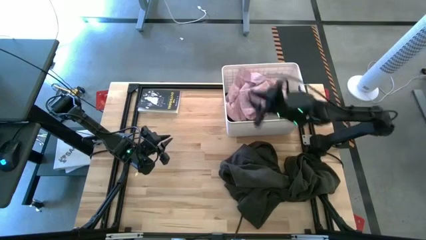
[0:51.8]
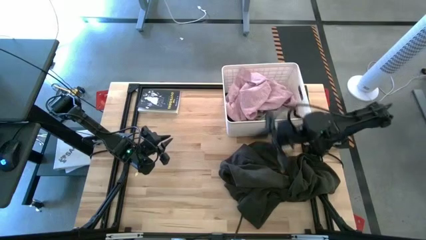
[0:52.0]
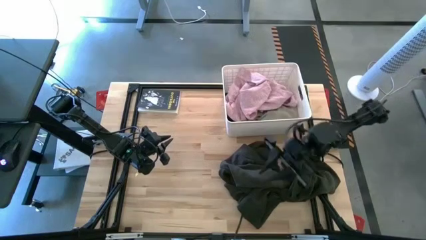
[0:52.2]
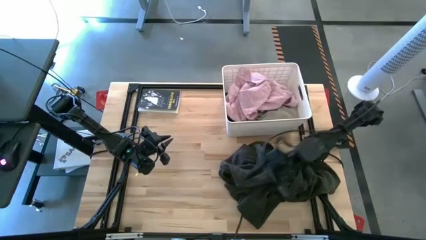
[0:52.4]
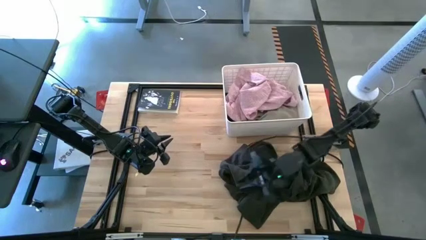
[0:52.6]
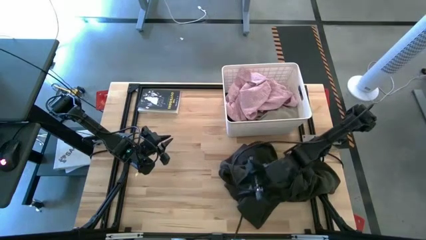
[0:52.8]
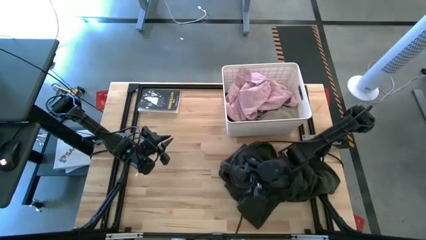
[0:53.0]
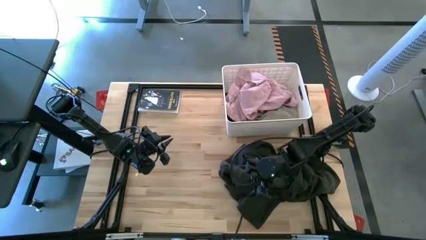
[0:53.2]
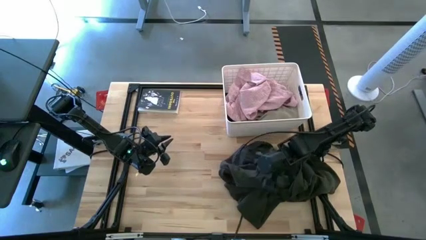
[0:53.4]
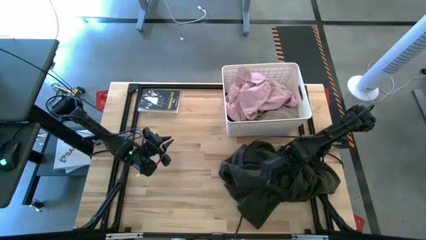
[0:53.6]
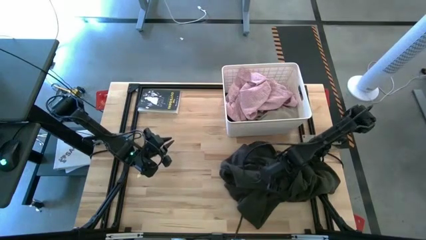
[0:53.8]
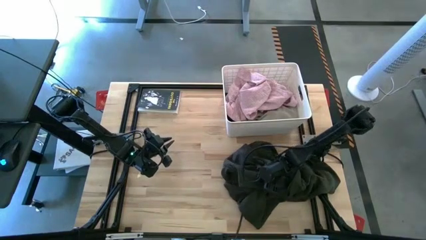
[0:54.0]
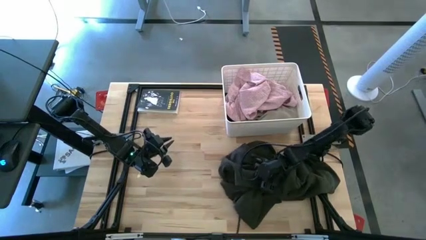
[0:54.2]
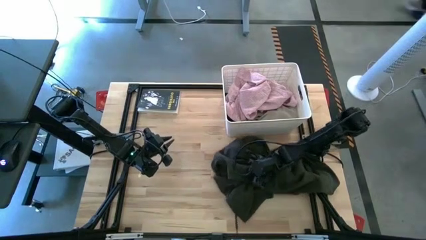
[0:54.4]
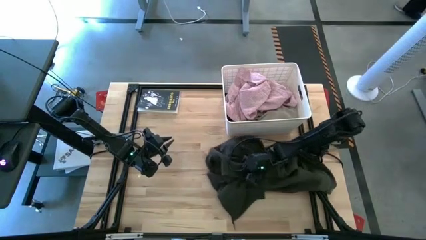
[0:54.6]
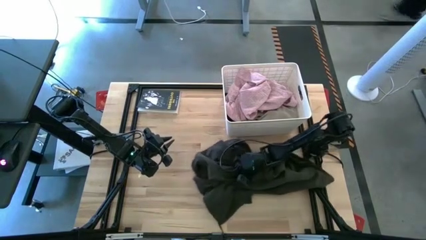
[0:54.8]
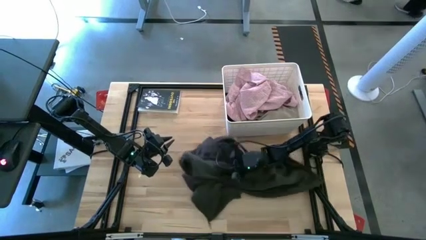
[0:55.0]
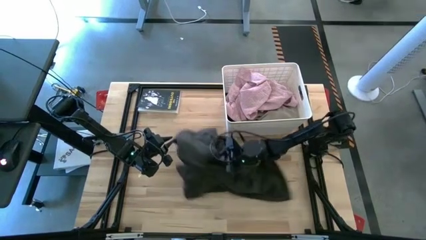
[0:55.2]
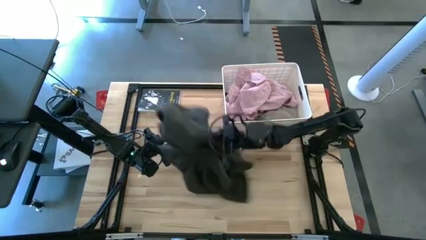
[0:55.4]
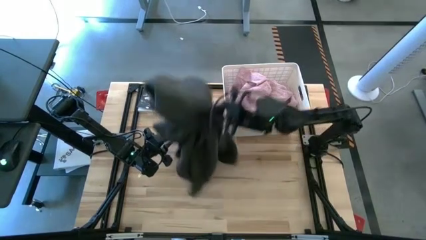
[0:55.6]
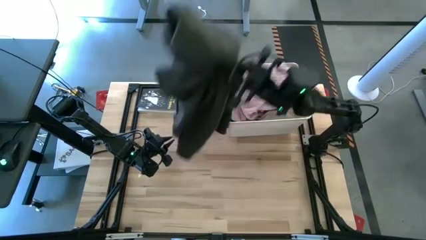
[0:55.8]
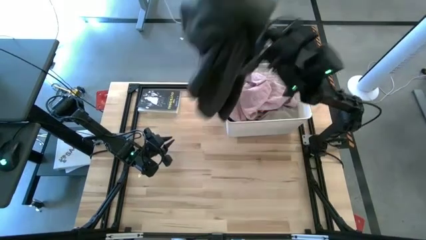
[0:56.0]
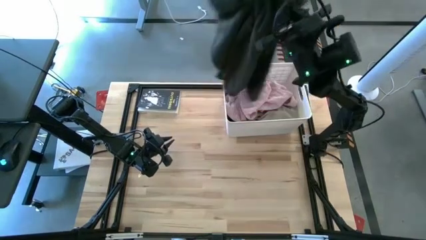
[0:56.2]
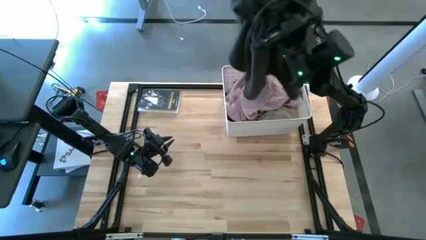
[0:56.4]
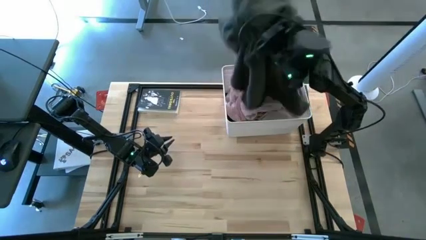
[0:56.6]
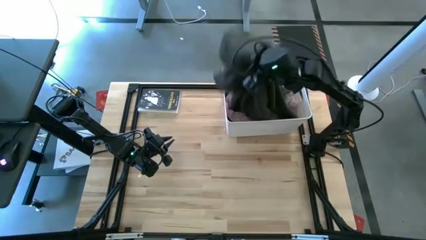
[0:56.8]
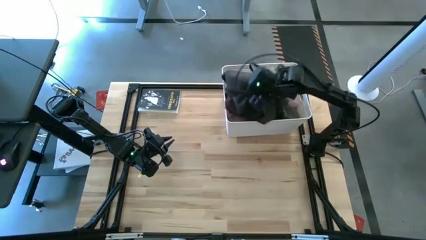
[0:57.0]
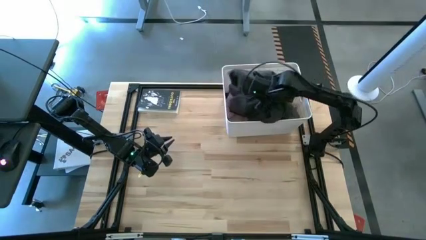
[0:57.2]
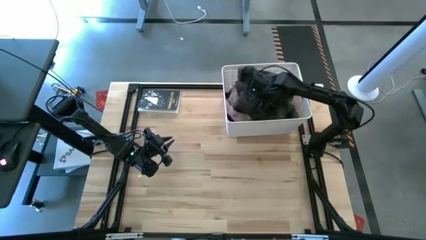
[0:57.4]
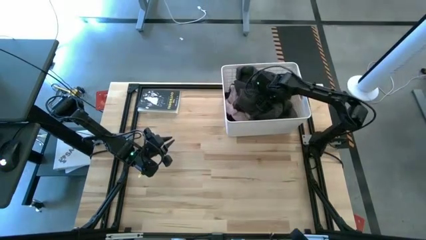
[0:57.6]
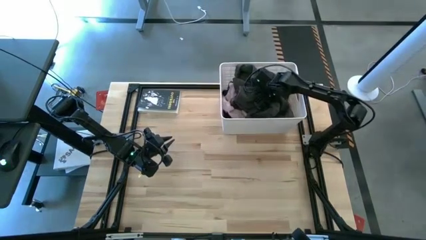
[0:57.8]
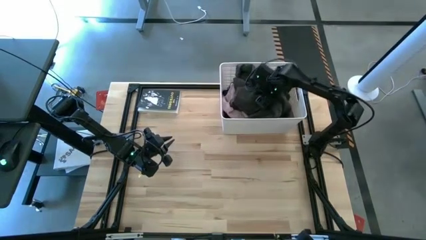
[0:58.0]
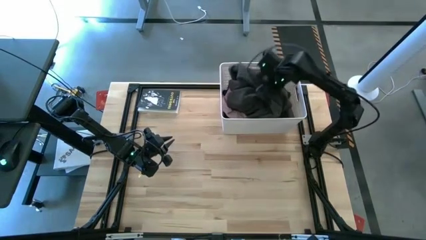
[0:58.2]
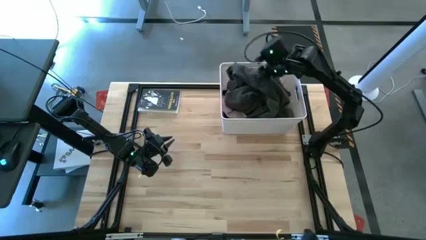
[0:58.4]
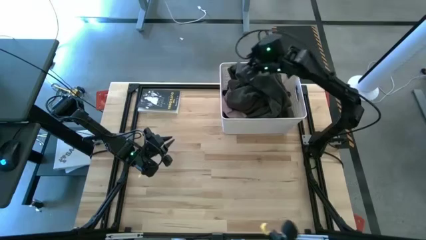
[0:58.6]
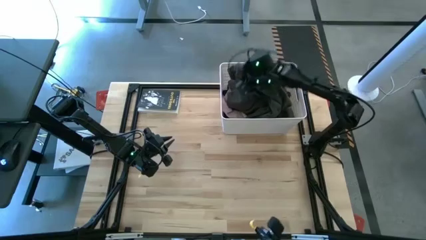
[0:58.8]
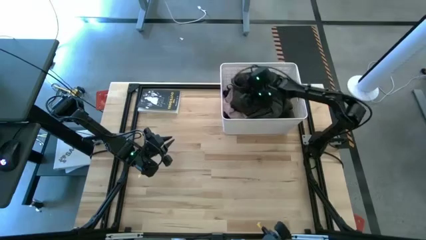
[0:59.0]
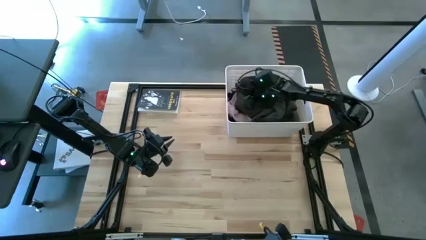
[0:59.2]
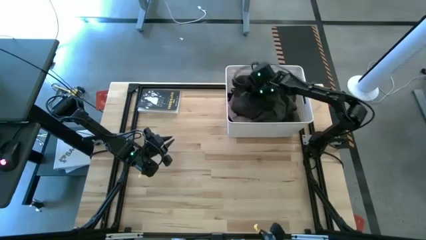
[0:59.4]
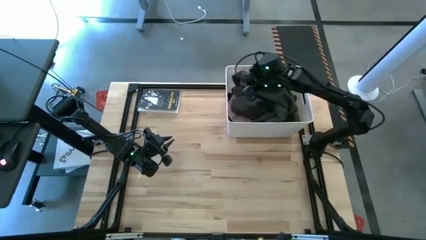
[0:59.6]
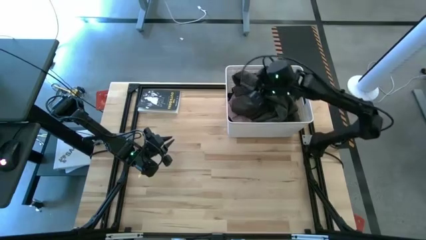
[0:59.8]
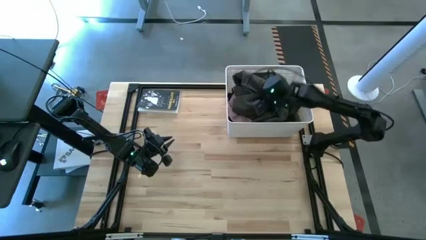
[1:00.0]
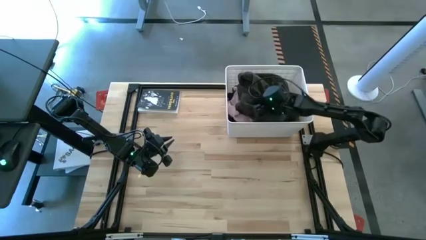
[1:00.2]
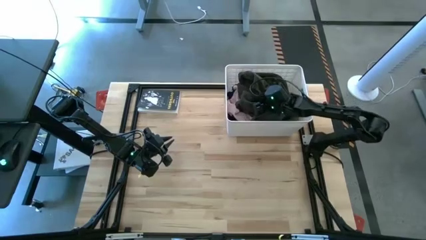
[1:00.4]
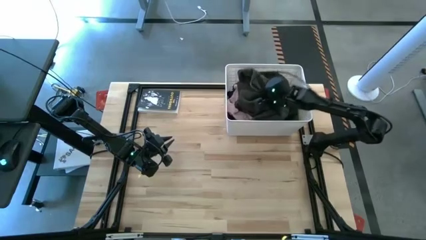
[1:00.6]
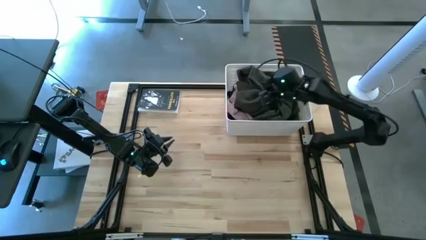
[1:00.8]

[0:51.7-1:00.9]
Task: Sort clothes
Put the black jacket into the laundry bin

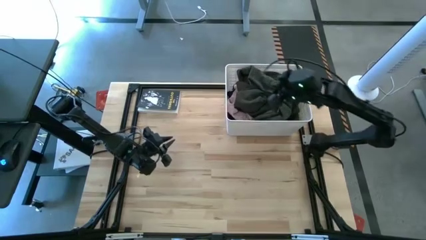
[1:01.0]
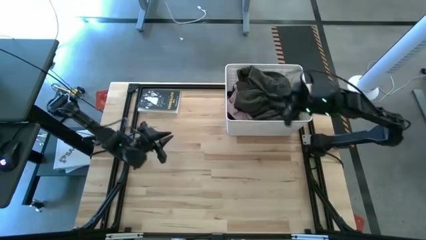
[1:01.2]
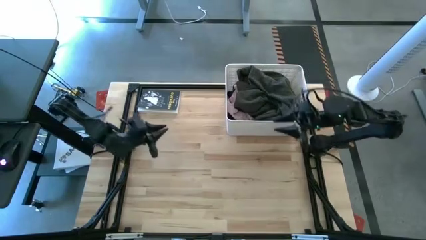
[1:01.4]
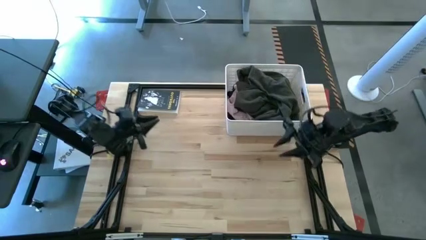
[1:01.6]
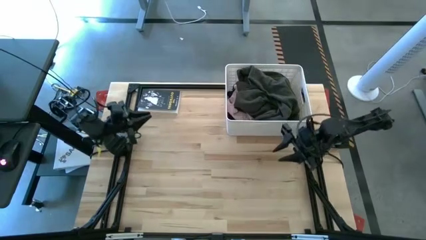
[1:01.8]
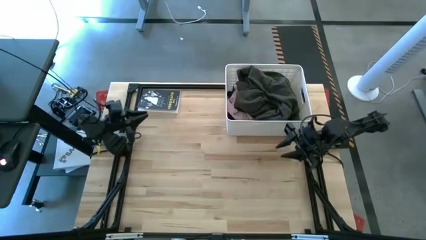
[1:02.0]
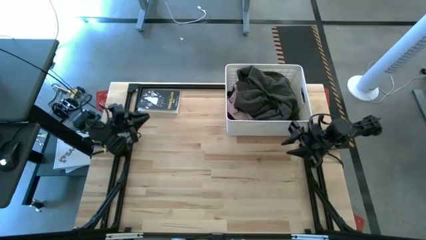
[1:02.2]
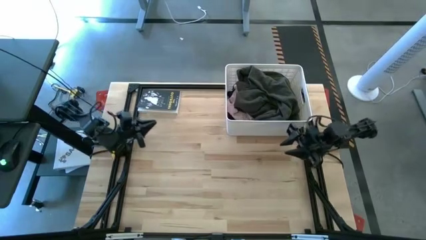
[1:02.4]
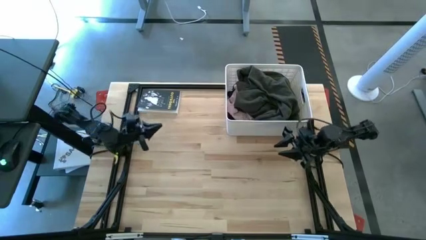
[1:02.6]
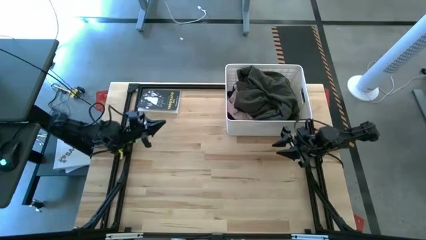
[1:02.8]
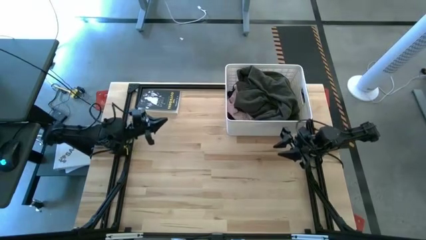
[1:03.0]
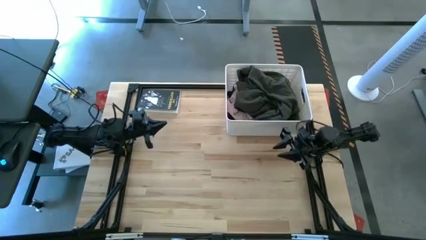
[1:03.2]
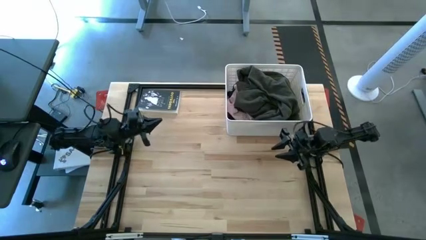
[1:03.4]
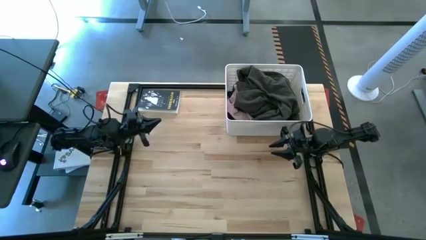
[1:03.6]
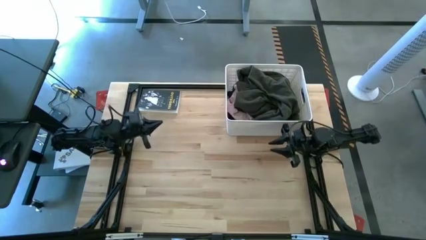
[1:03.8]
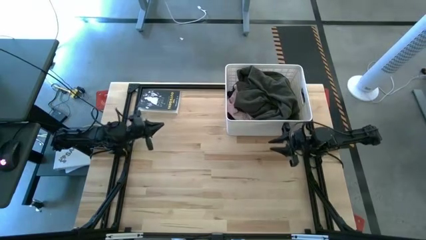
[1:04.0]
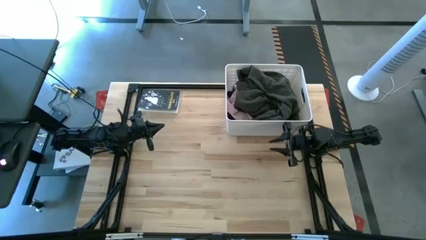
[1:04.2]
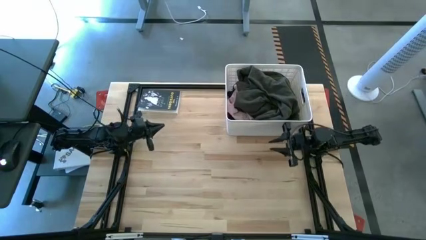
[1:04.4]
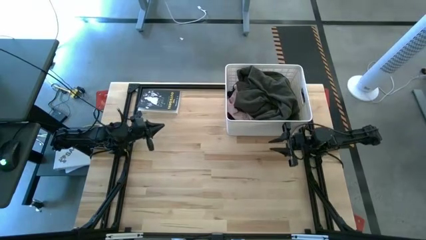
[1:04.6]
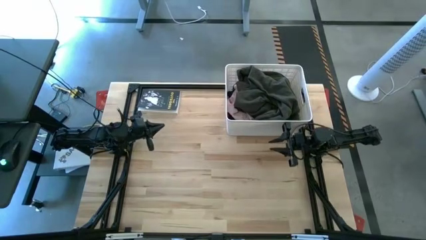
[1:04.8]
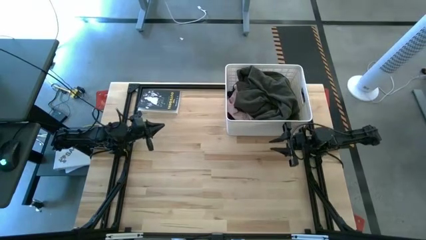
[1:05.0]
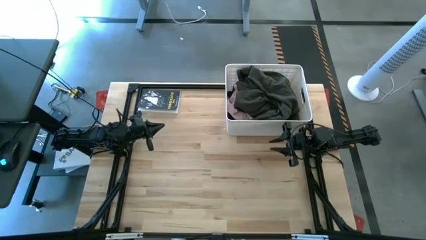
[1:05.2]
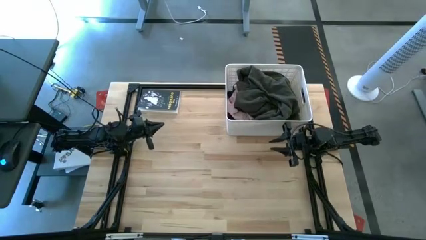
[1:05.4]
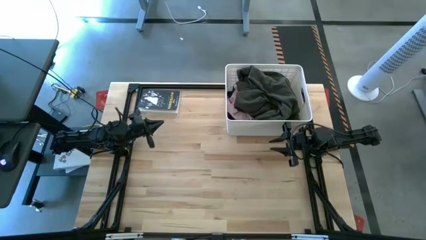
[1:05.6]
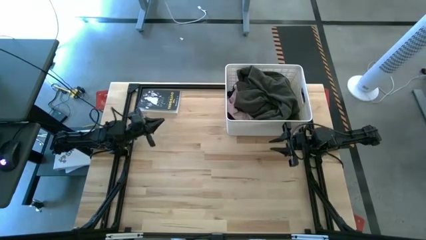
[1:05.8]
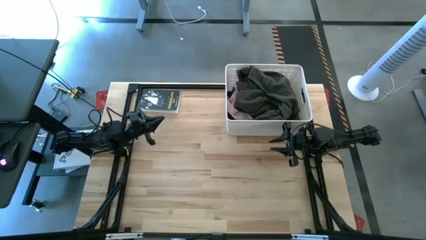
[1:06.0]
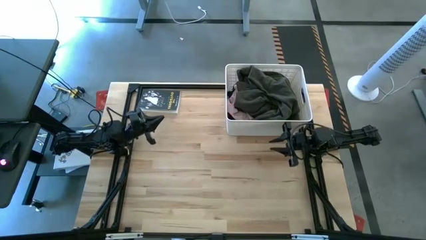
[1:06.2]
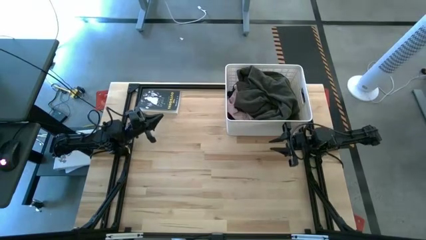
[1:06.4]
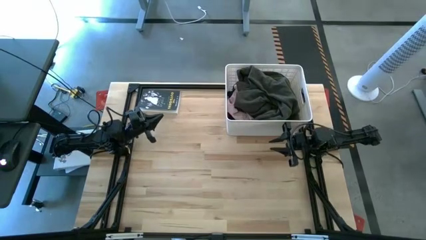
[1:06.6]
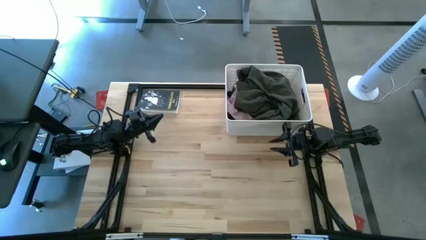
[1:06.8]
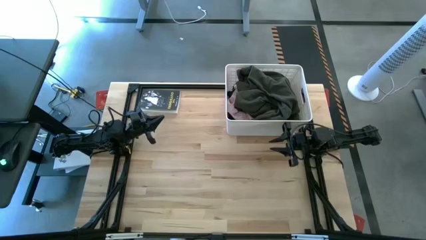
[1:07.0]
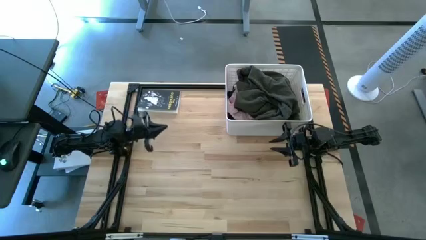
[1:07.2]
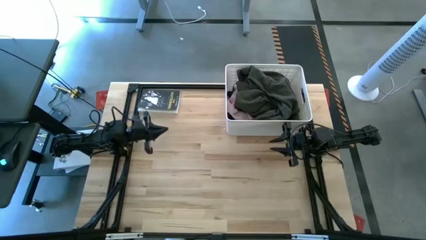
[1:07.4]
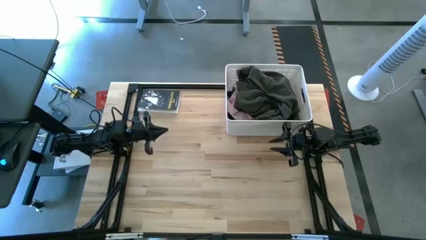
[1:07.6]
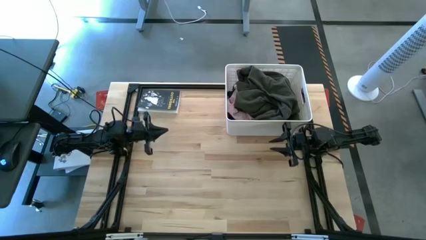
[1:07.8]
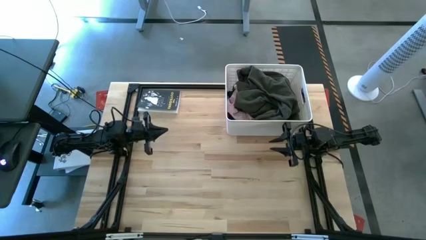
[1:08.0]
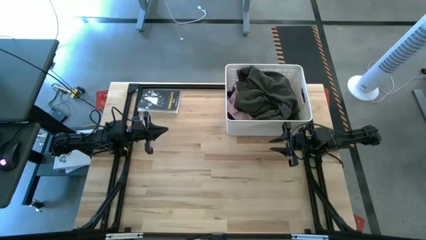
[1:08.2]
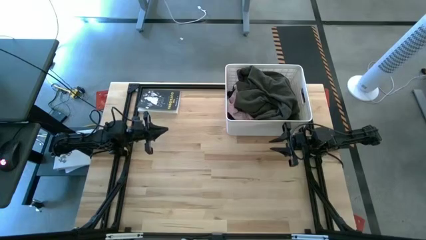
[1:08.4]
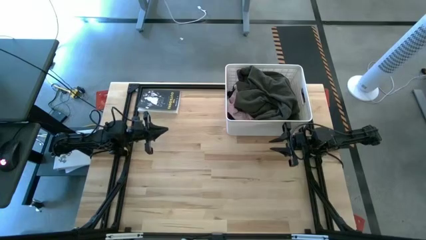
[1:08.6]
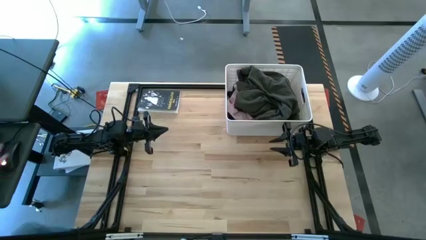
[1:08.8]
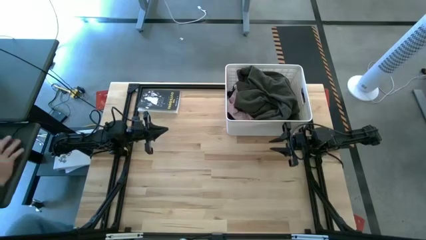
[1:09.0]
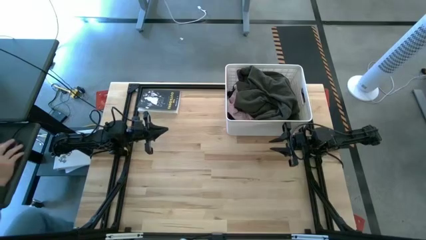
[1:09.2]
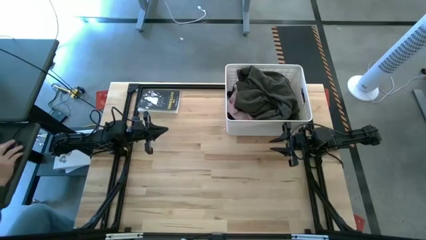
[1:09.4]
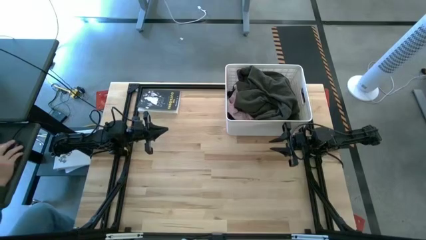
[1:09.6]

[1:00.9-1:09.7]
Return to Home Position
